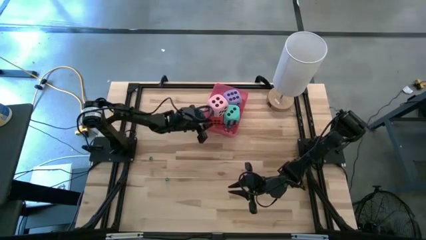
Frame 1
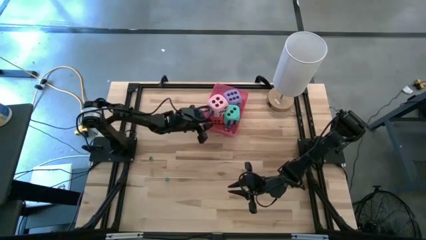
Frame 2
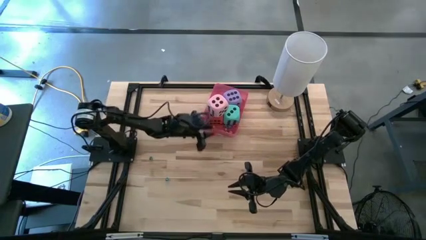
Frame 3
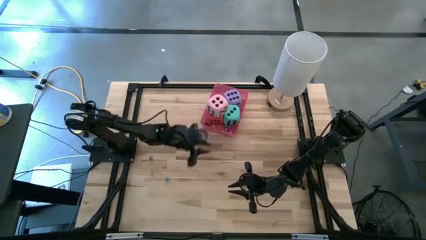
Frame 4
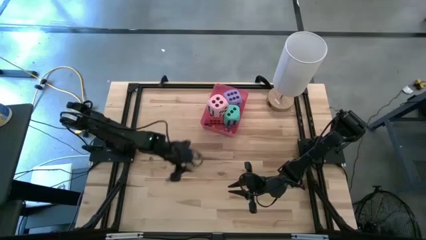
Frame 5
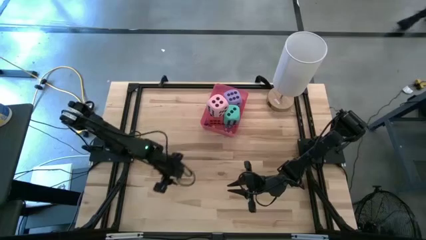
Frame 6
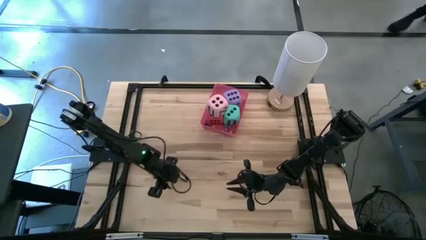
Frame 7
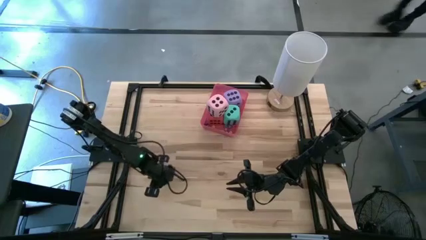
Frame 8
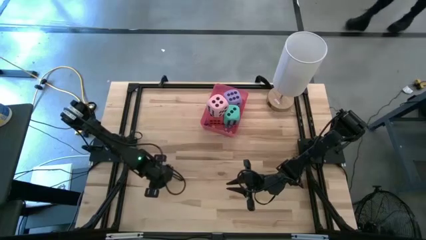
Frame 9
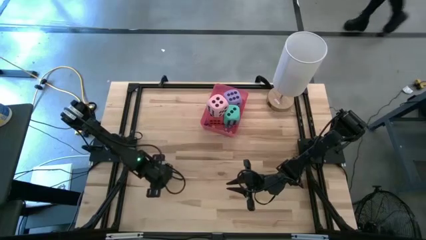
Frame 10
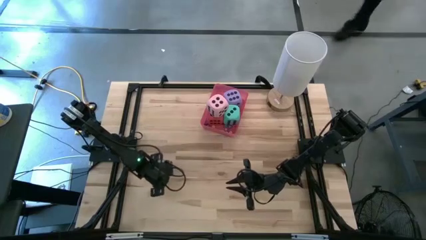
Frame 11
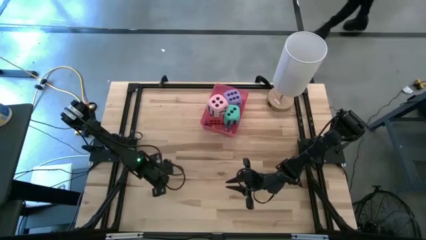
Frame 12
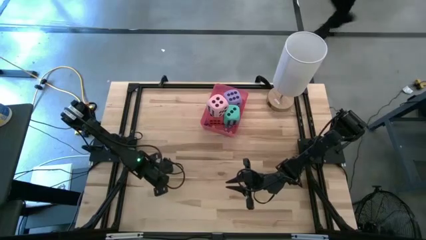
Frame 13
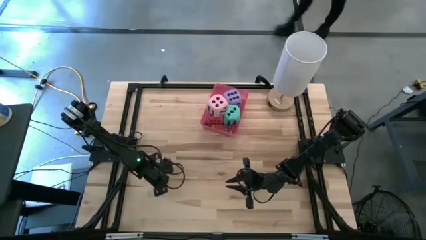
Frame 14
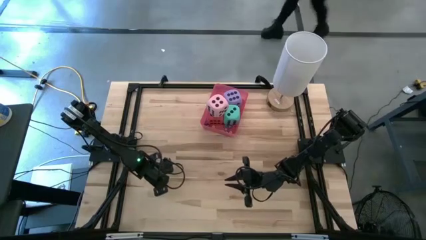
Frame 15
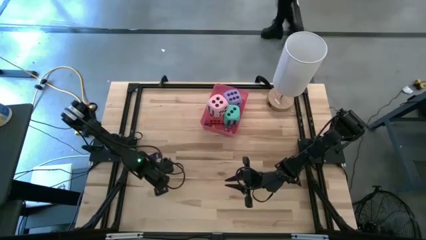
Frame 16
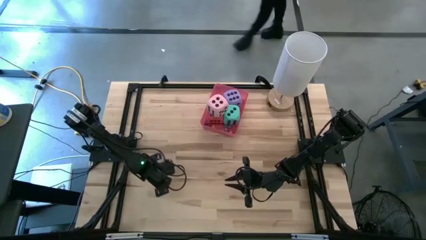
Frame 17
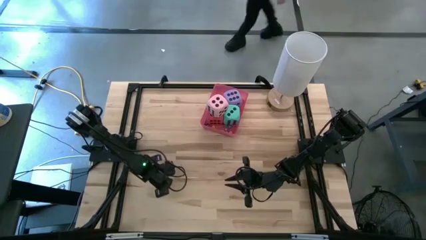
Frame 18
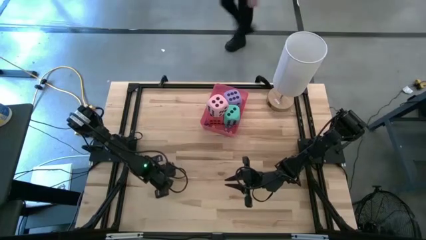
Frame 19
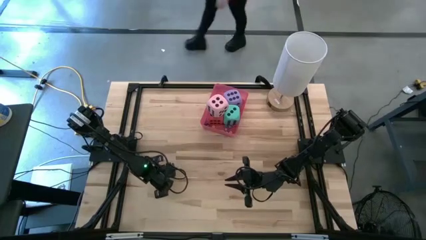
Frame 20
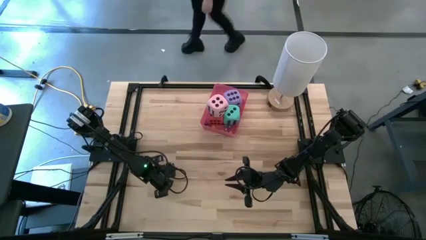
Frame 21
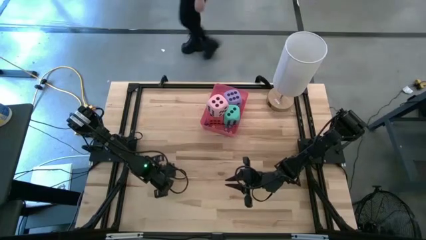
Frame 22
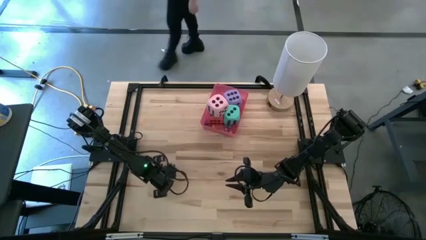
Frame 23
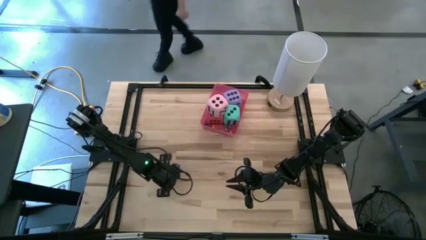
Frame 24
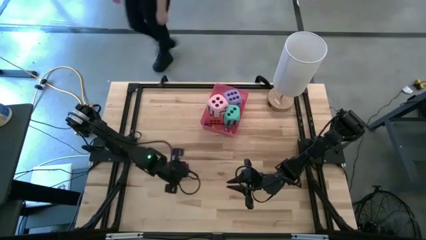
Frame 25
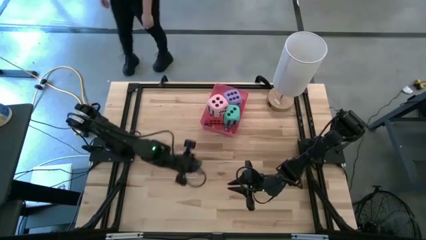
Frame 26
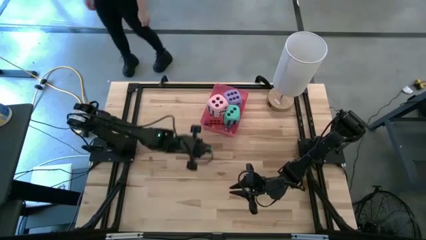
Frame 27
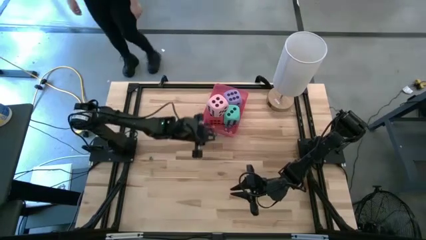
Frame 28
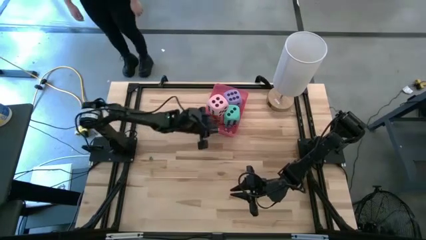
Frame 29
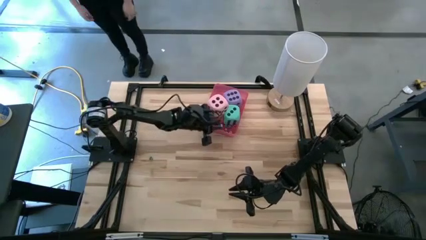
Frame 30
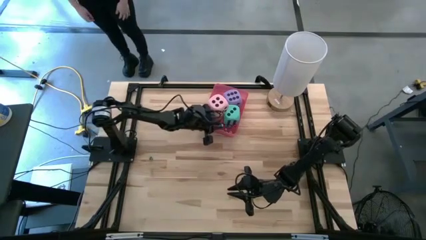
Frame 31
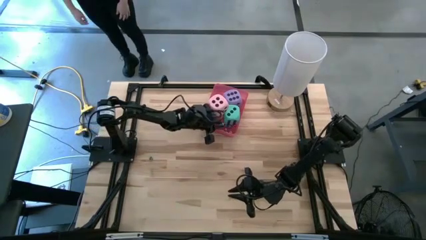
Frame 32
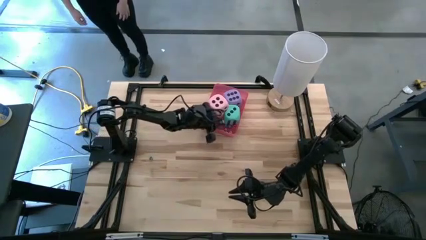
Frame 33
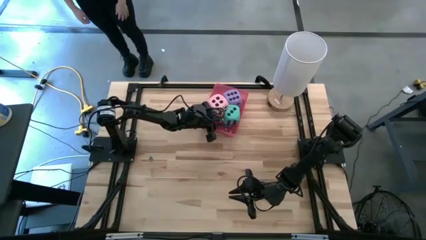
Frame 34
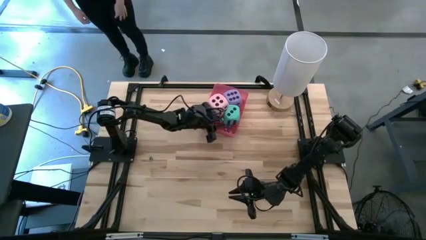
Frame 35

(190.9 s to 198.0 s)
Task: Pick & Place Dice
Put the small blue dice into the bin

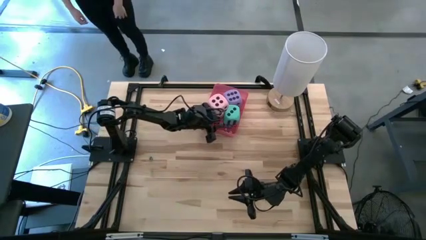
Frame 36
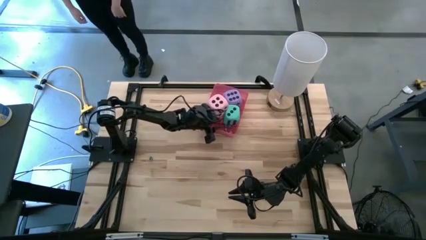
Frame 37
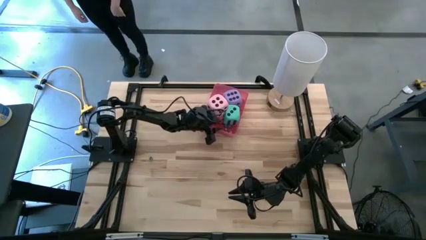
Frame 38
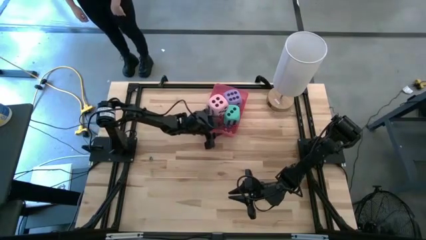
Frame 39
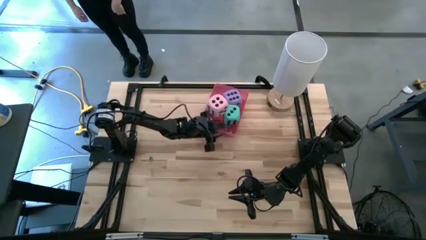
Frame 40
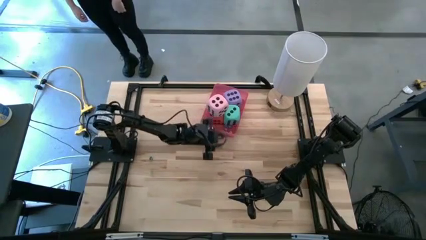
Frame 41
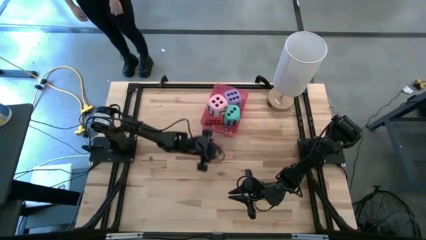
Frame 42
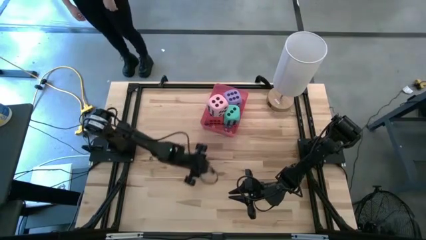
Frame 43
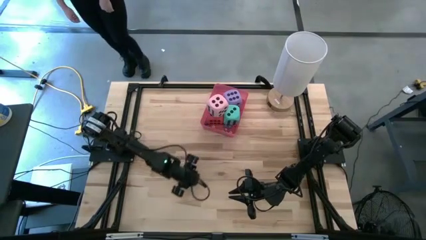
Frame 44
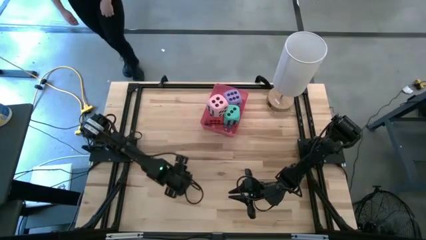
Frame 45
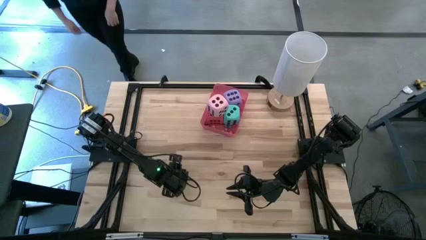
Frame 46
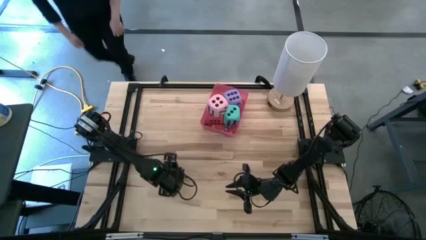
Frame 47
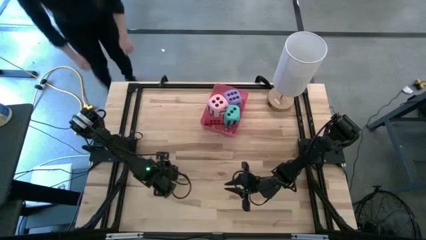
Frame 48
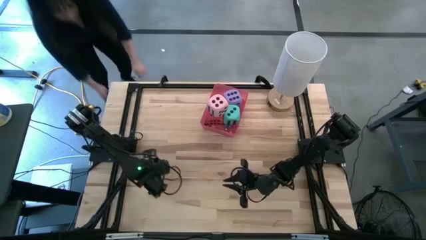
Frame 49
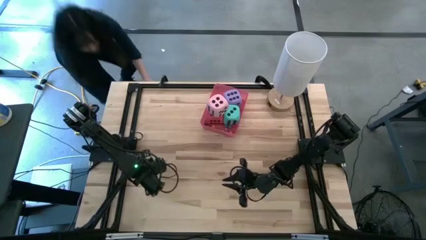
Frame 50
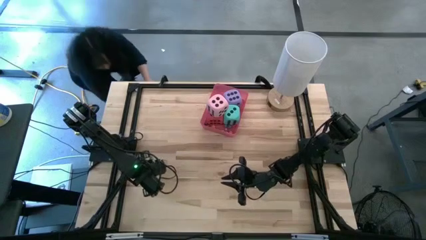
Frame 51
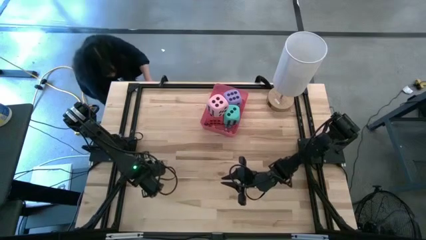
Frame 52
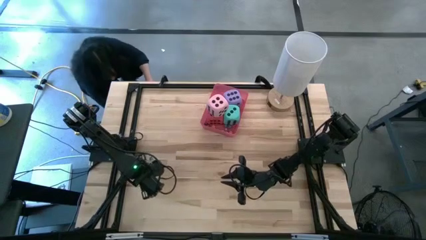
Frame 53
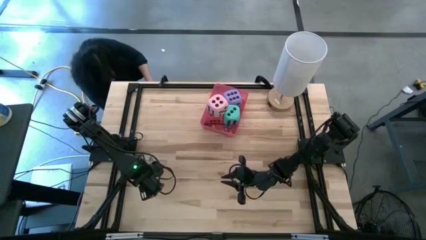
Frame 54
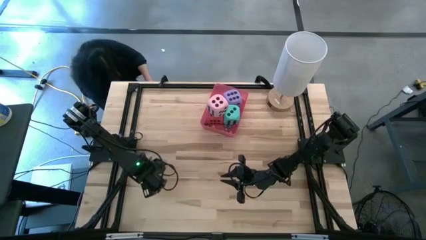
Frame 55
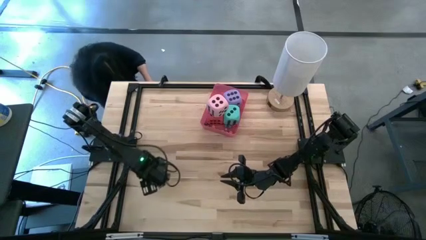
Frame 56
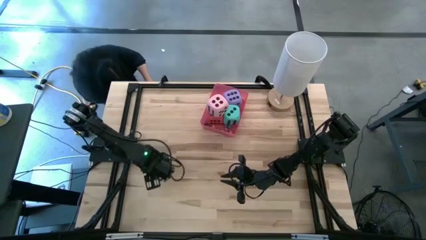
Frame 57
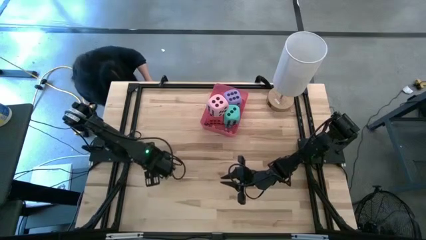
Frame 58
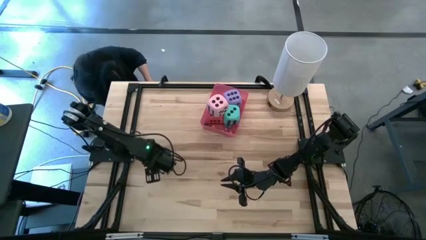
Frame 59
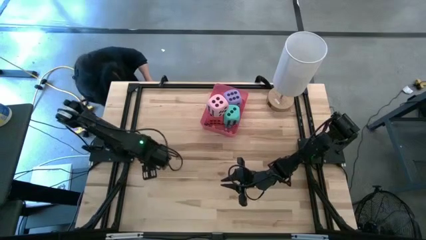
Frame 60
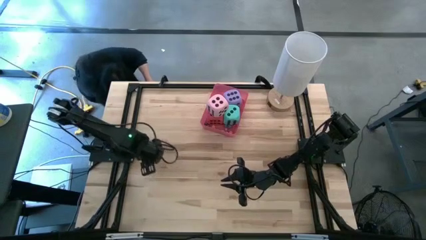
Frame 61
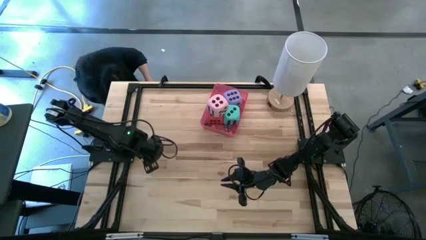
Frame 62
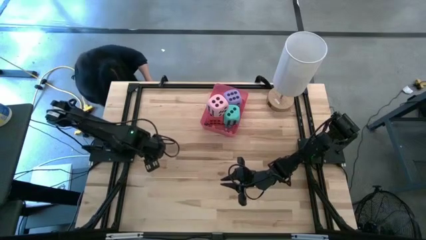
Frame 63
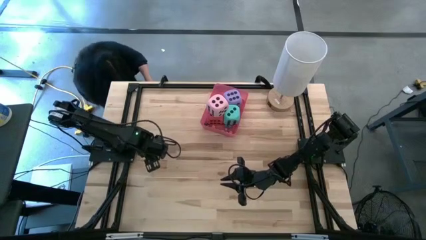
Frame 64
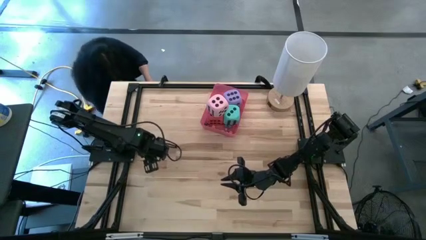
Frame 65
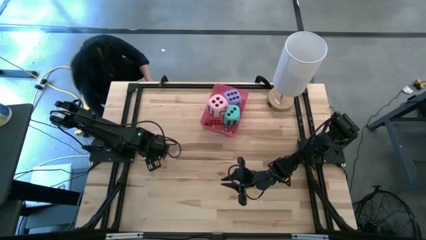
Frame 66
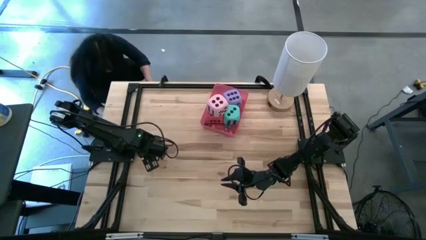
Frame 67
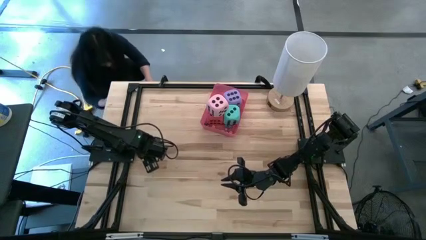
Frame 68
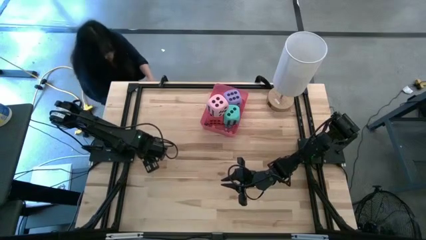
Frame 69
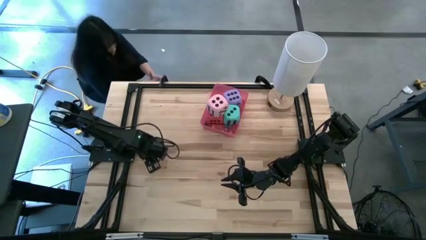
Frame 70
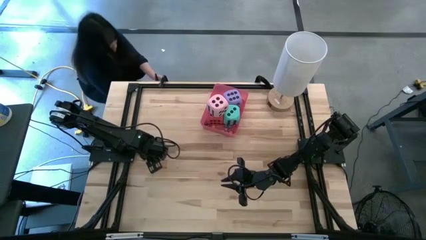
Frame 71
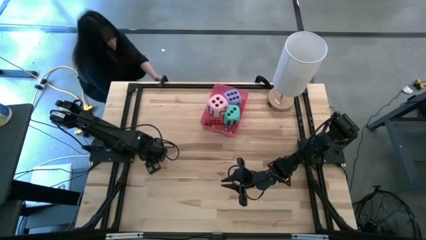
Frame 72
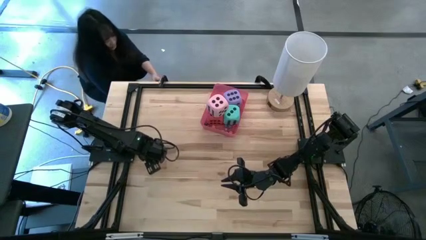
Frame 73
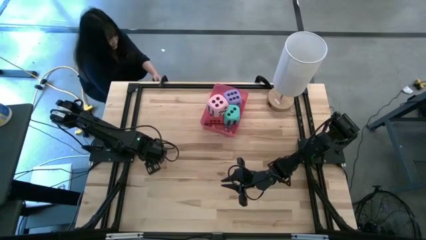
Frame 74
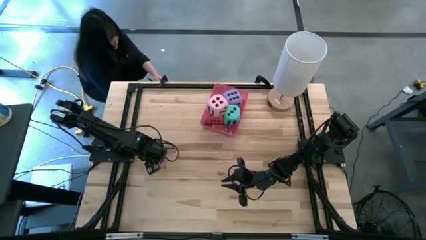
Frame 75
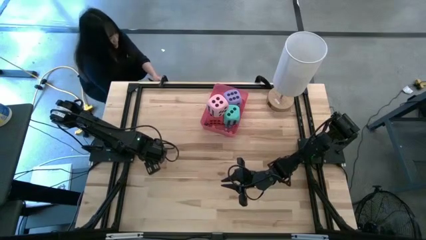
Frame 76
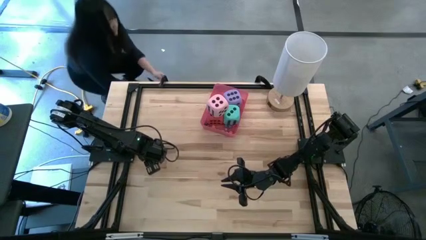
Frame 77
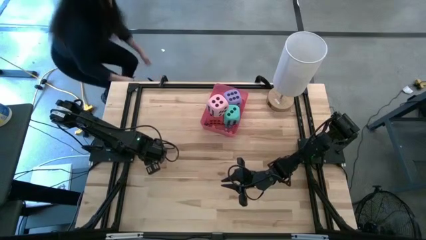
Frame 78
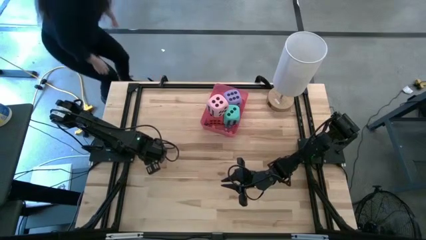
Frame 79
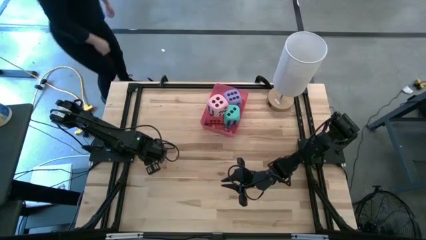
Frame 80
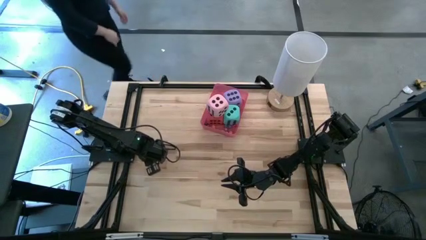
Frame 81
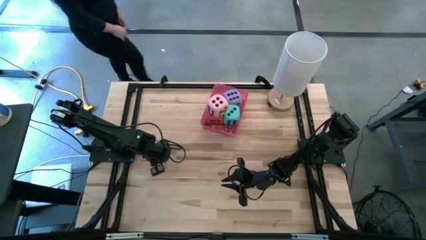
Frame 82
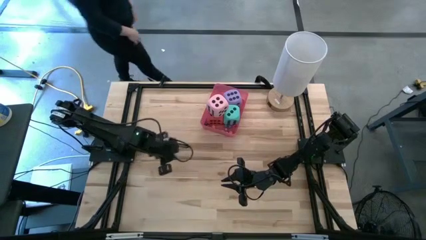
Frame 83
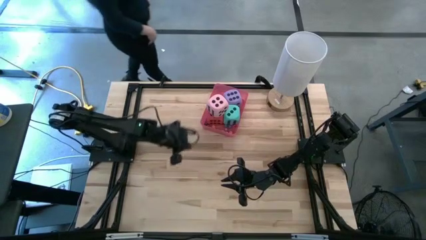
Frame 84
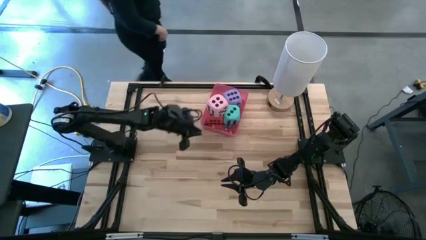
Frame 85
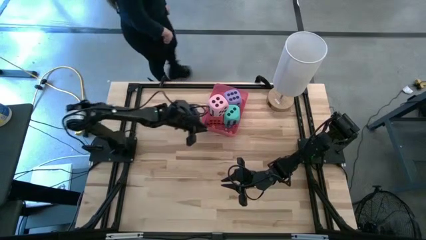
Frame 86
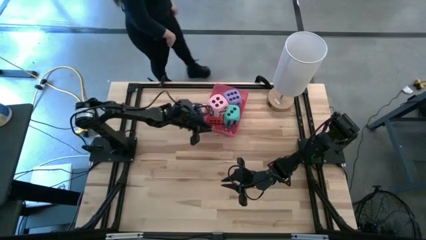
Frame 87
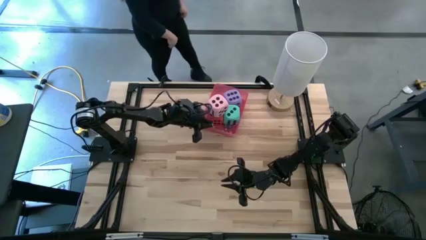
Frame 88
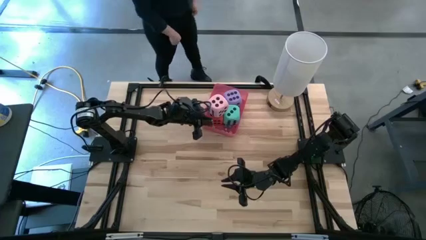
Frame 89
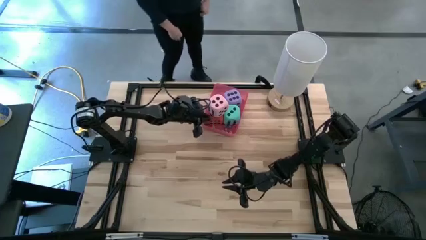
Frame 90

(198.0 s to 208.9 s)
Put the small green dice into the bin
